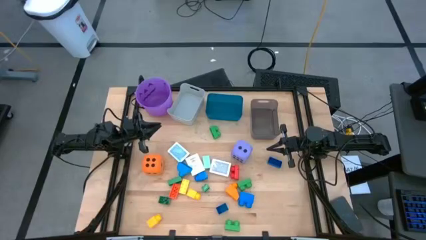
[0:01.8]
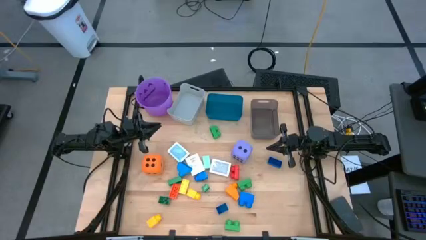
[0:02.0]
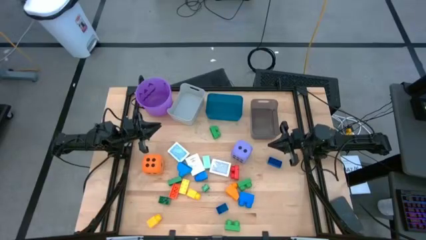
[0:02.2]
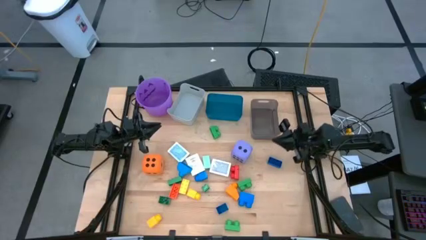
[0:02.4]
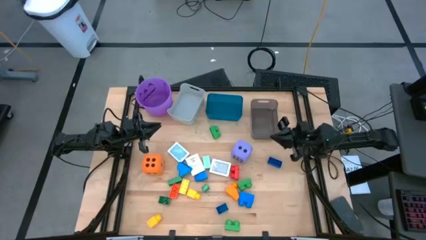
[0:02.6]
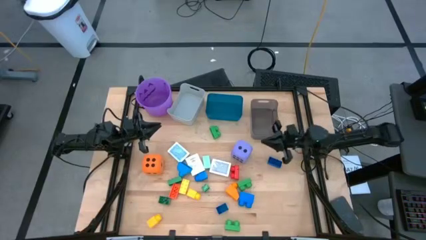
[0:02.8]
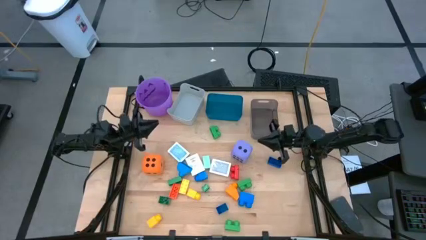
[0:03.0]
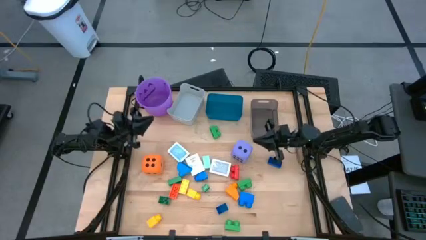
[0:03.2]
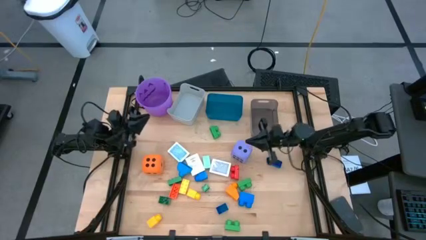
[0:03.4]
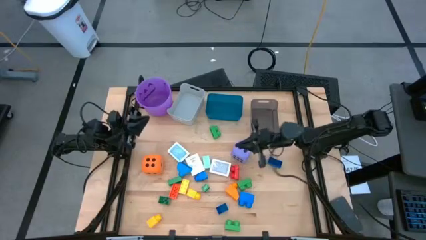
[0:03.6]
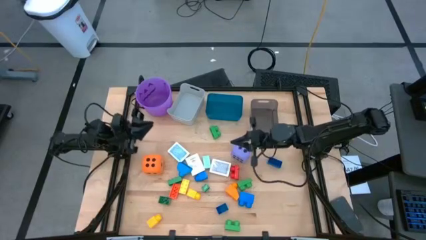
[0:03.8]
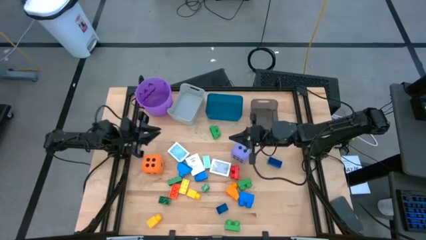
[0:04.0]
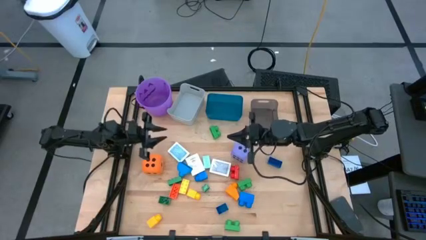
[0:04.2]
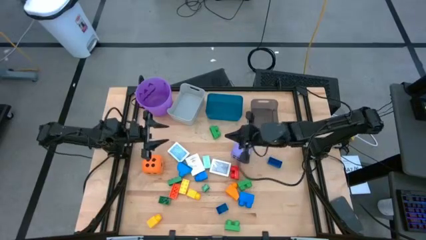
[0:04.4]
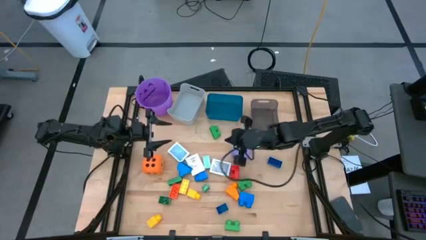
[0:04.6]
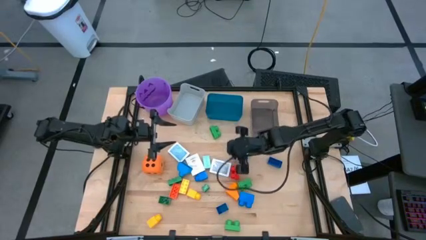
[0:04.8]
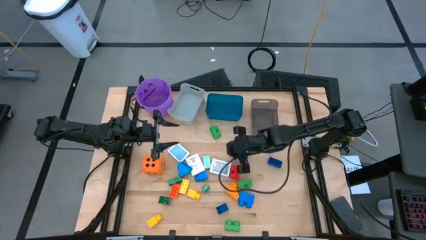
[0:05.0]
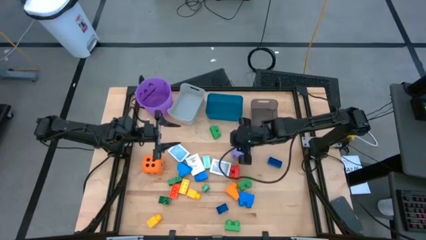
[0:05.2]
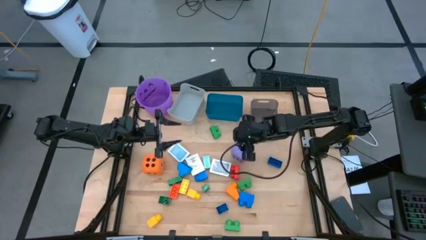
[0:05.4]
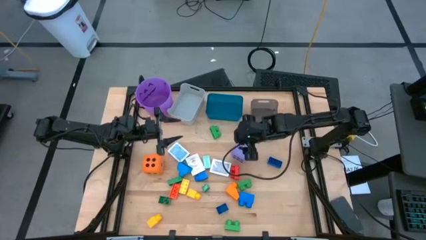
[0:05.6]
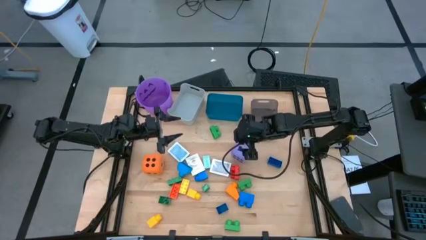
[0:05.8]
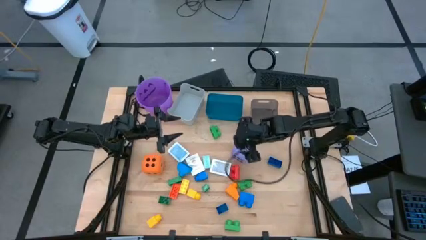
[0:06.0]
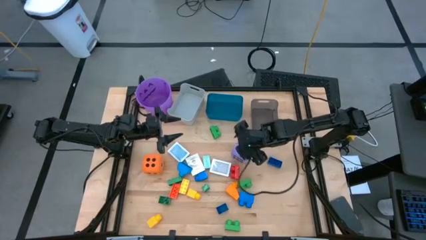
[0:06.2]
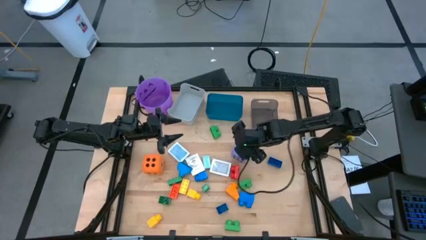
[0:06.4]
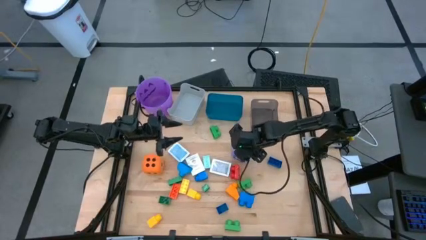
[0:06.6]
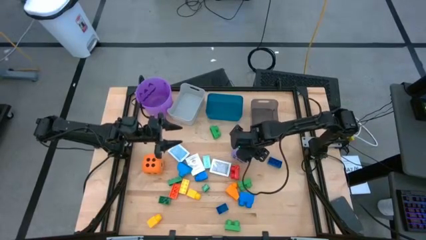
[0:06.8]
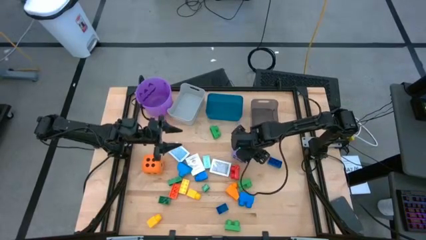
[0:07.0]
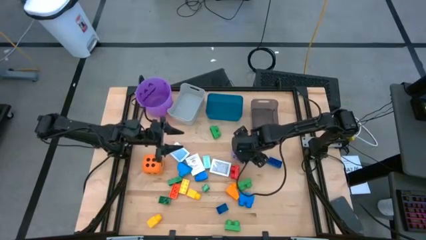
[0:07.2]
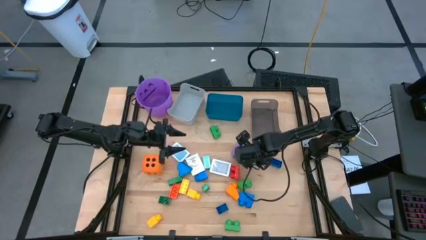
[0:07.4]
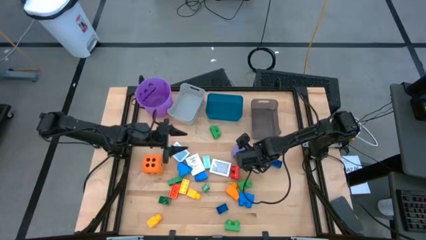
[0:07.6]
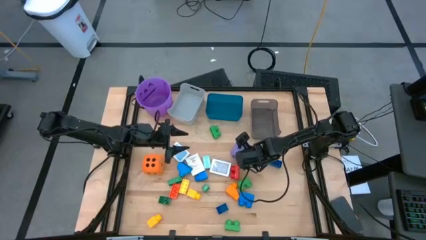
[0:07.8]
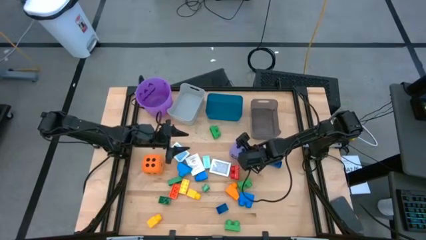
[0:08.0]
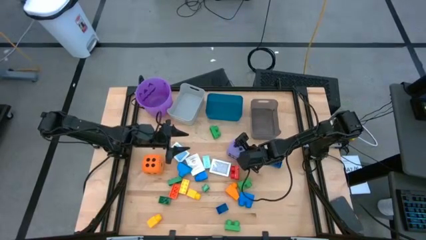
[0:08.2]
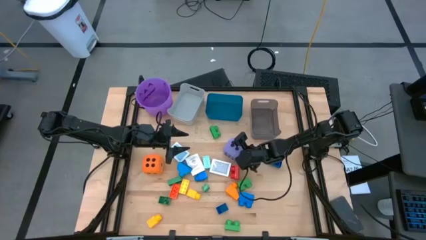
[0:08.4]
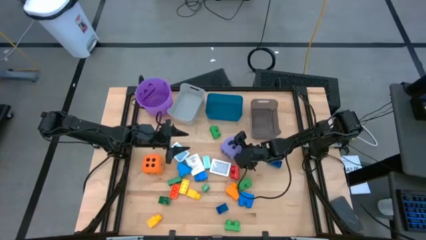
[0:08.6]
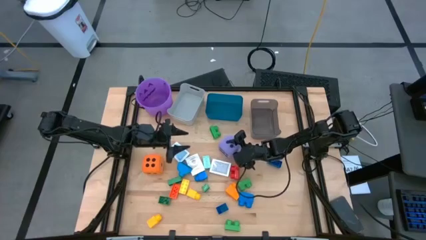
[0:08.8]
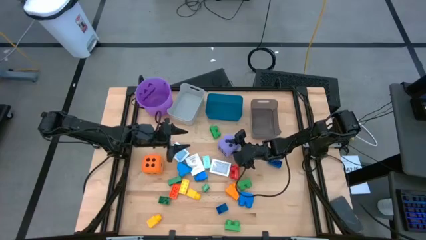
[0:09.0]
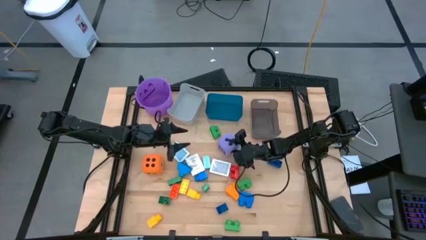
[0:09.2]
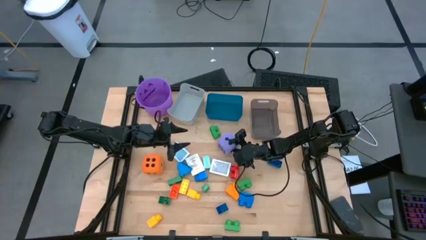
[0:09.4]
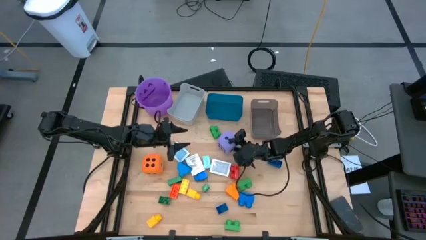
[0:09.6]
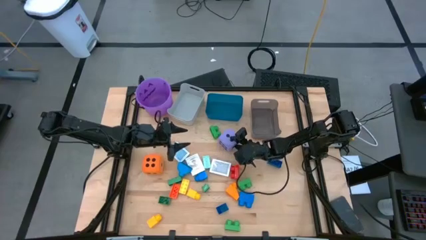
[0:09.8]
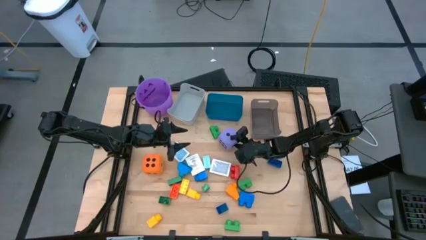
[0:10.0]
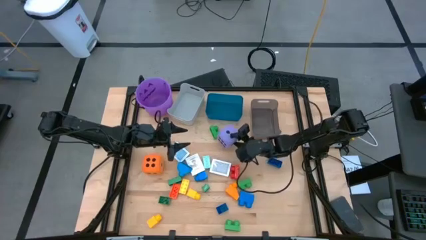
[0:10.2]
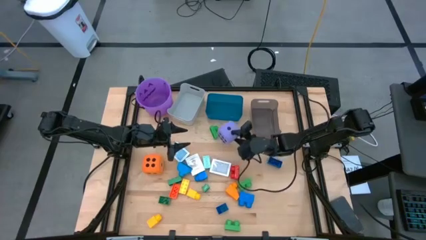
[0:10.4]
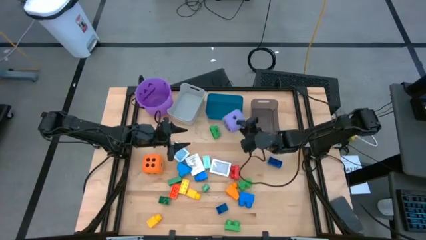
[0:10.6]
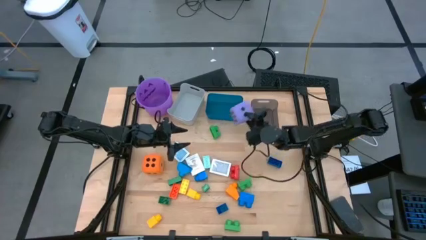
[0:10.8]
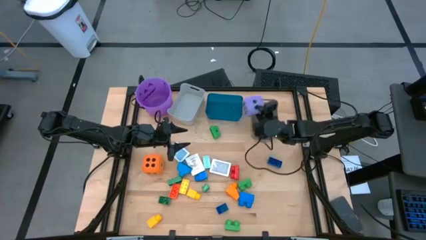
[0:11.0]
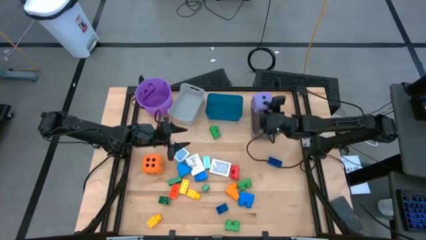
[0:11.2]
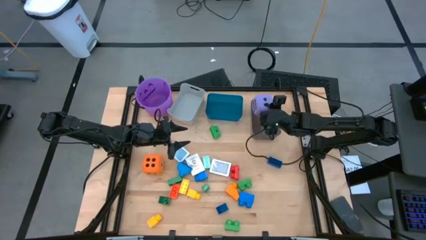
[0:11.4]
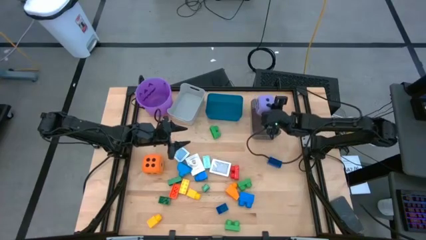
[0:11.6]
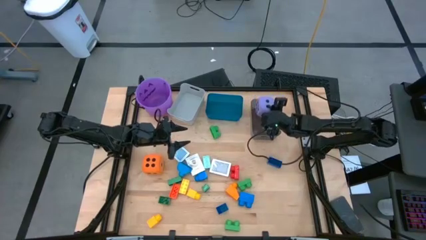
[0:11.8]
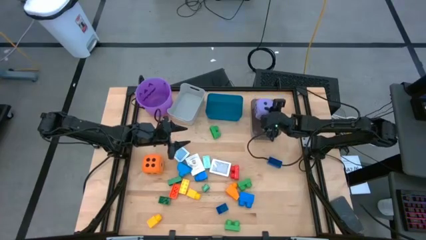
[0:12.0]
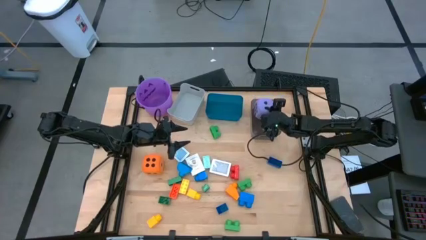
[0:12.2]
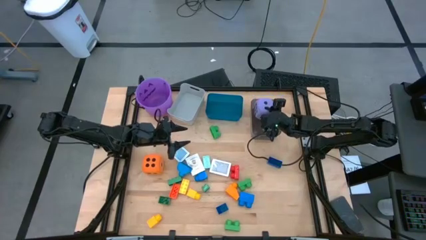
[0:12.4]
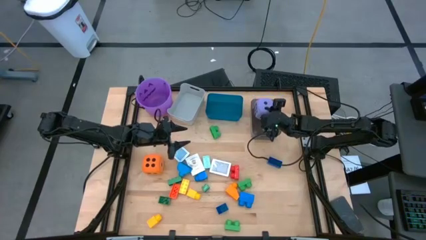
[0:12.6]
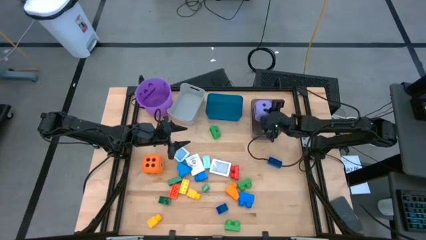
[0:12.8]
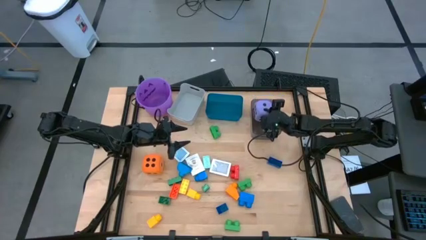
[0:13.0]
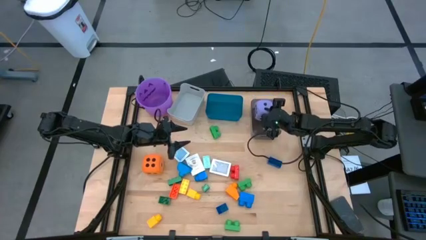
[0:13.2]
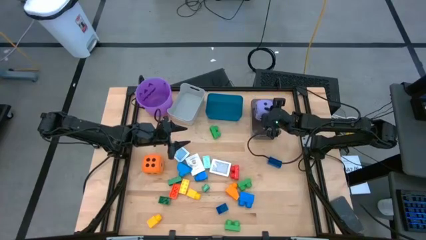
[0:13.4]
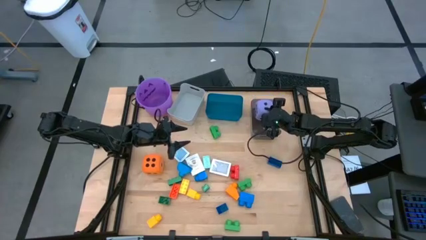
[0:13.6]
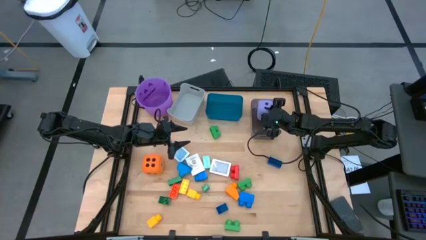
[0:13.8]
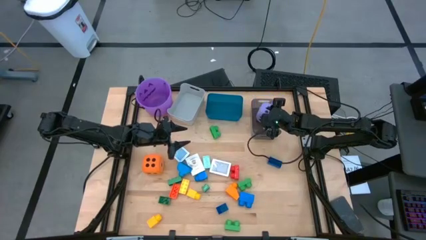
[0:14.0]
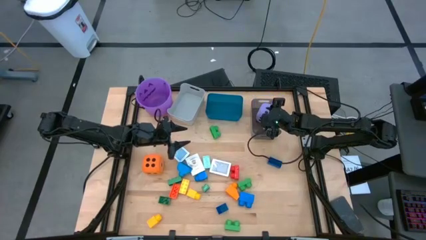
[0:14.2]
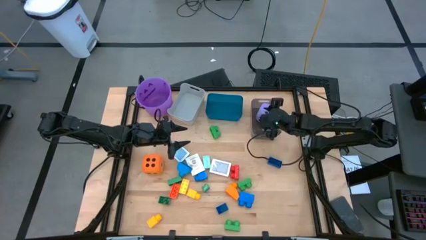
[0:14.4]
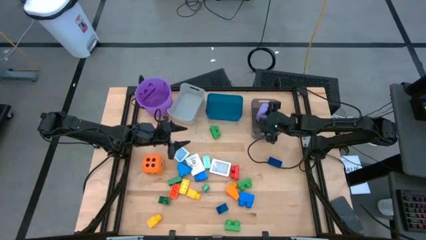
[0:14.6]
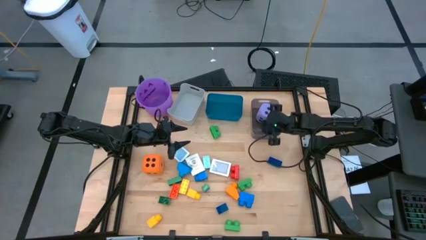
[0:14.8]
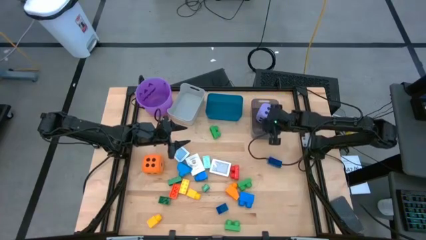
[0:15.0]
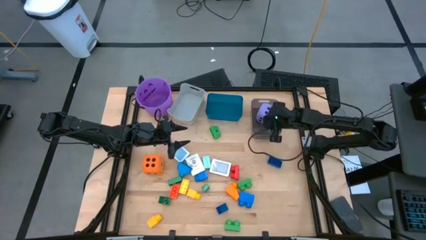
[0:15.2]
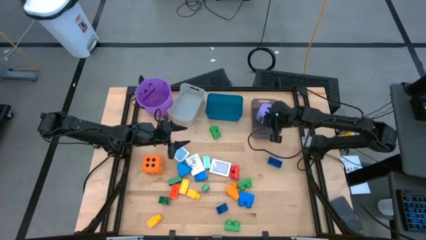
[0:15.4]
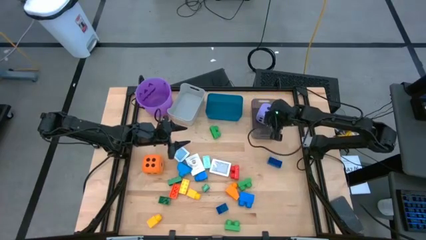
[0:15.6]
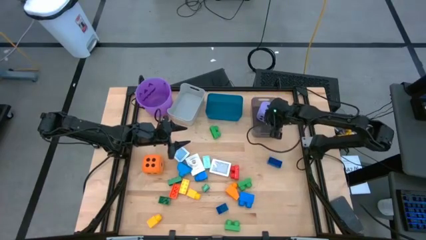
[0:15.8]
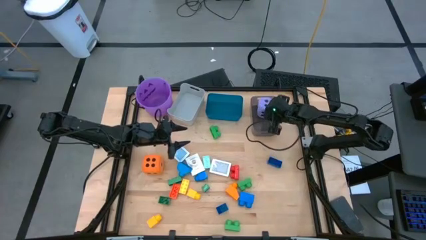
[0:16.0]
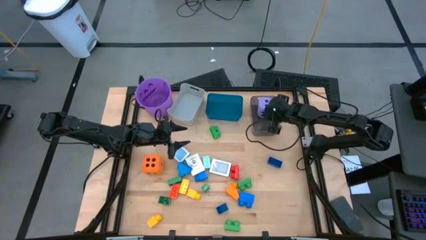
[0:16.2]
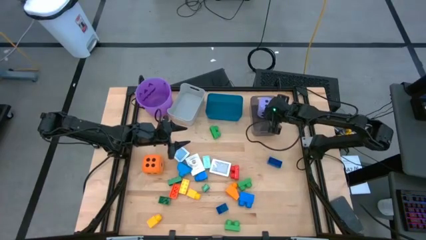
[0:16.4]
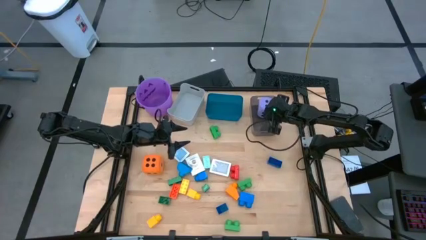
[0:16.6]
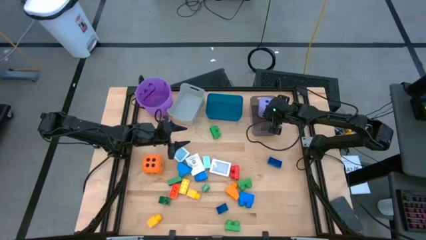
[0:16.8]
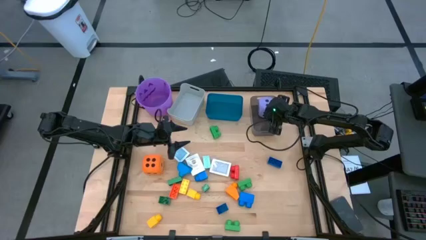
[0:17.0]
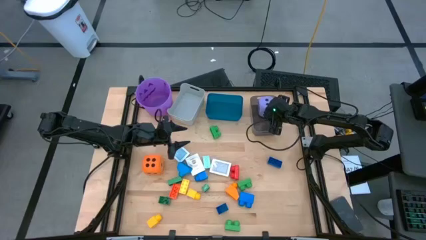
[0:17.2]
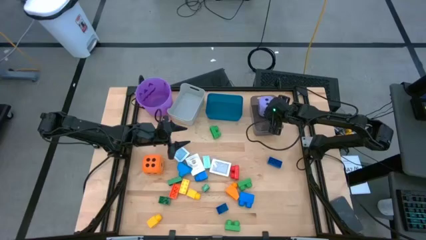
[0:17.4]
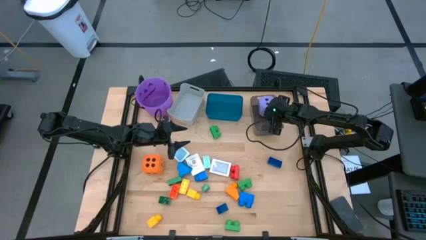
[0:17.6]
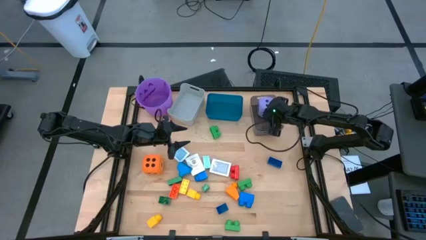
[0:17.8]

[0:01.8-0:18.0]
Task: Pick & Place Toys
Put the purple die into the black bin
